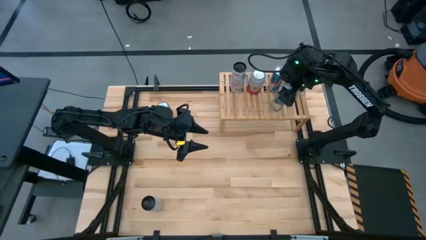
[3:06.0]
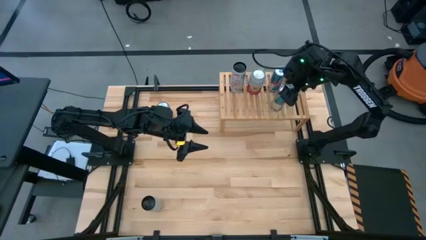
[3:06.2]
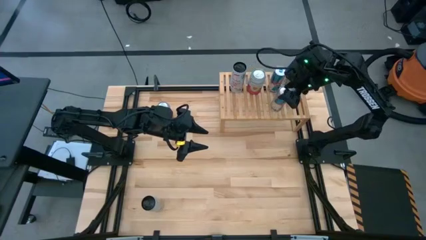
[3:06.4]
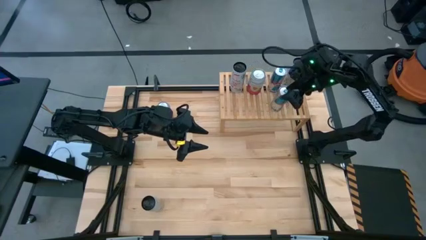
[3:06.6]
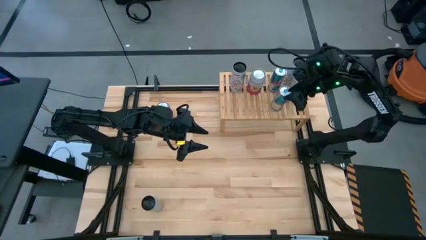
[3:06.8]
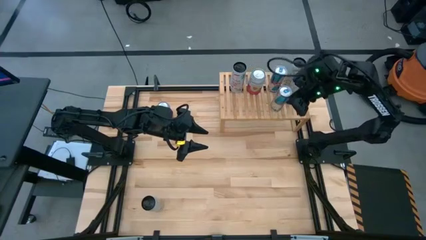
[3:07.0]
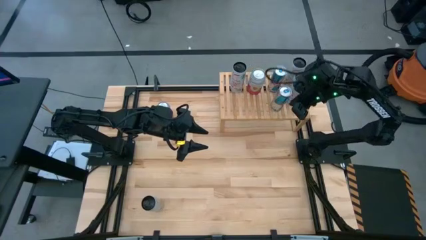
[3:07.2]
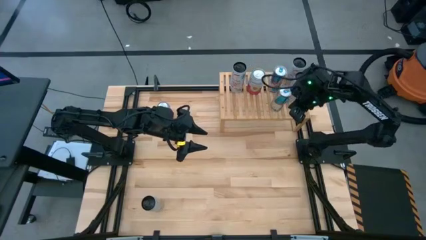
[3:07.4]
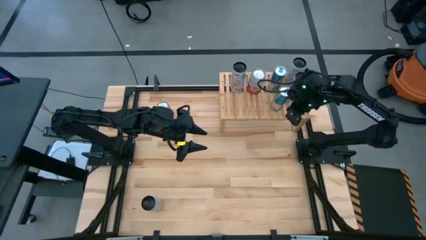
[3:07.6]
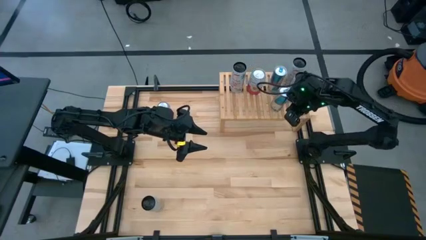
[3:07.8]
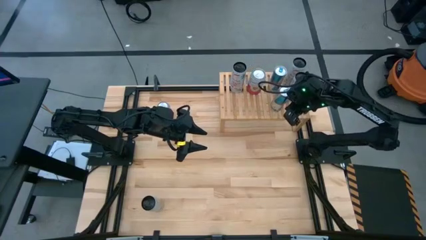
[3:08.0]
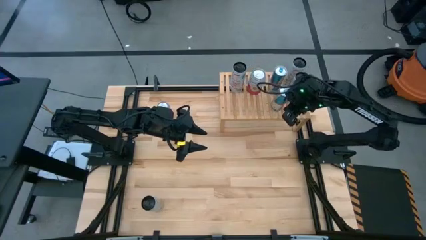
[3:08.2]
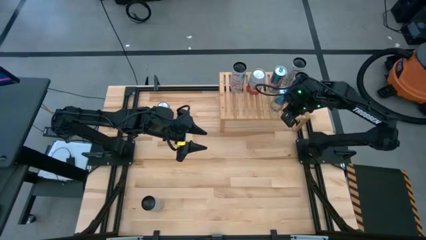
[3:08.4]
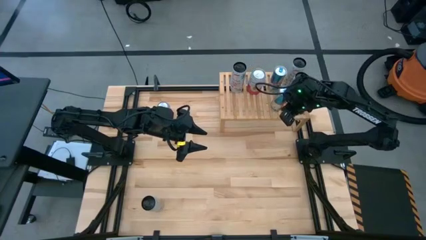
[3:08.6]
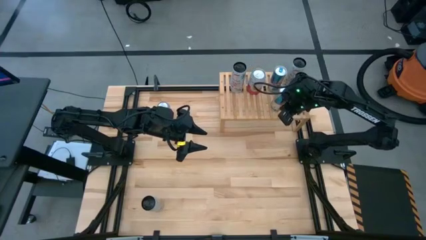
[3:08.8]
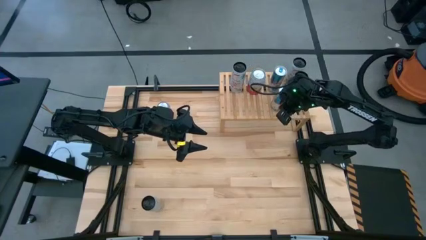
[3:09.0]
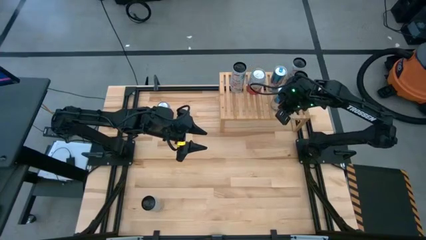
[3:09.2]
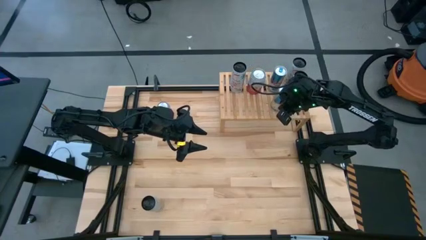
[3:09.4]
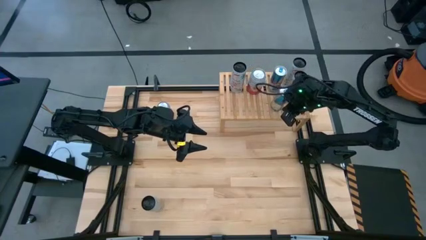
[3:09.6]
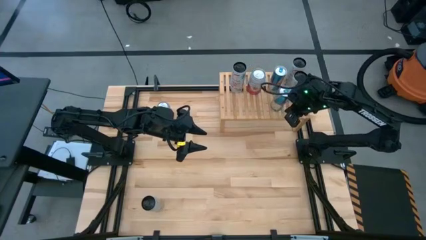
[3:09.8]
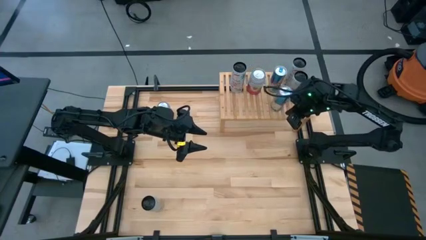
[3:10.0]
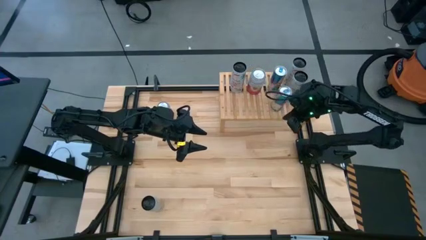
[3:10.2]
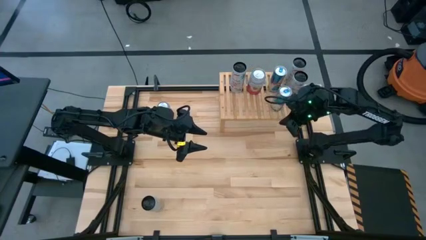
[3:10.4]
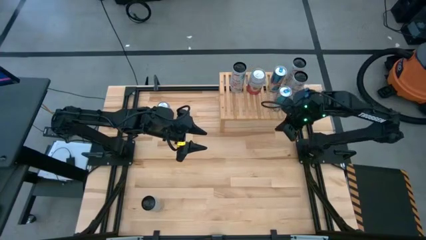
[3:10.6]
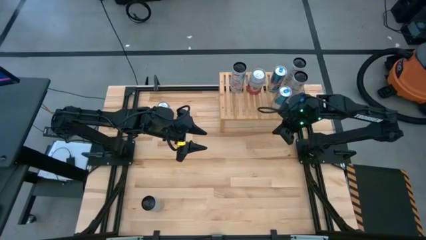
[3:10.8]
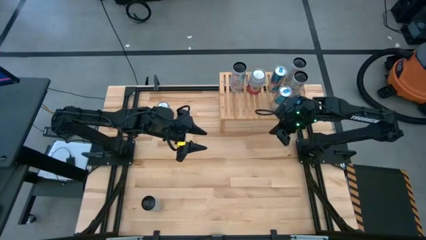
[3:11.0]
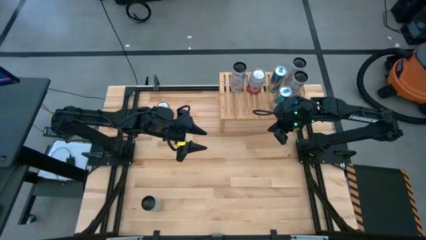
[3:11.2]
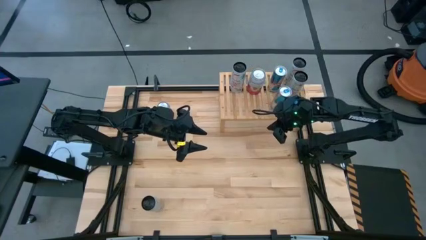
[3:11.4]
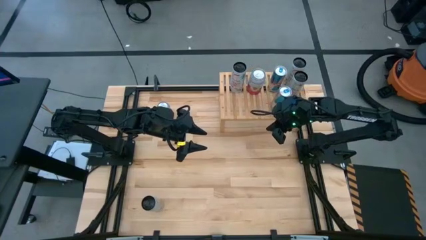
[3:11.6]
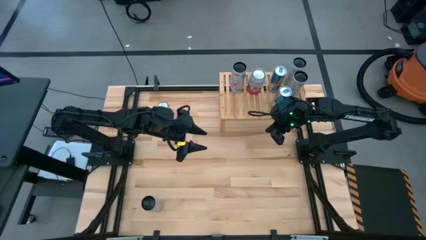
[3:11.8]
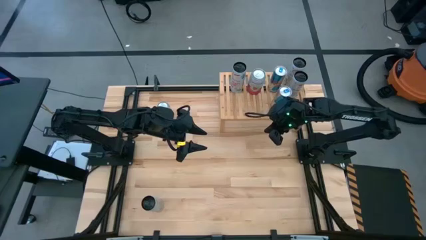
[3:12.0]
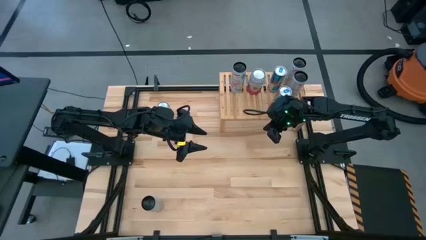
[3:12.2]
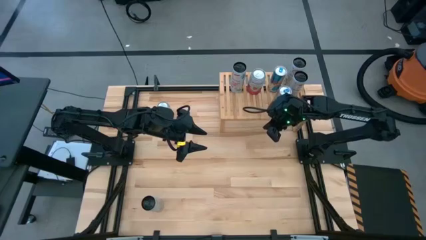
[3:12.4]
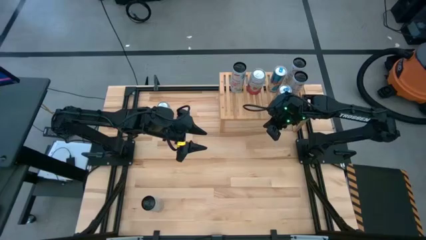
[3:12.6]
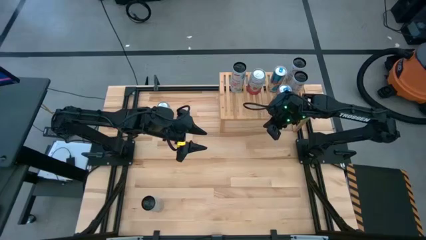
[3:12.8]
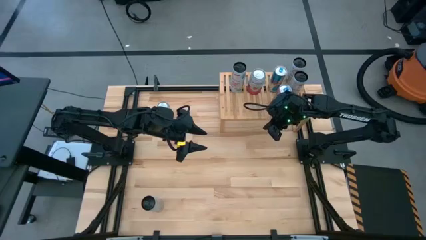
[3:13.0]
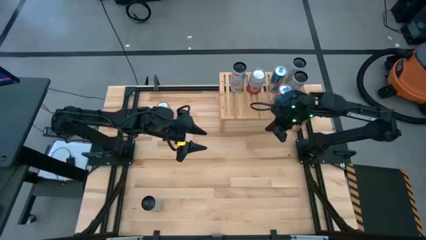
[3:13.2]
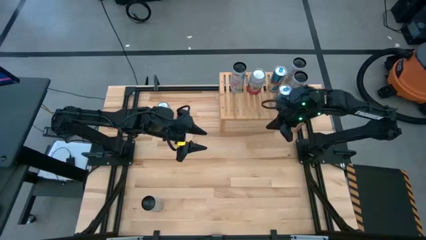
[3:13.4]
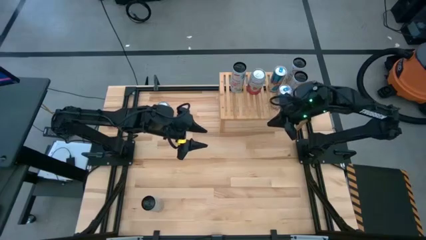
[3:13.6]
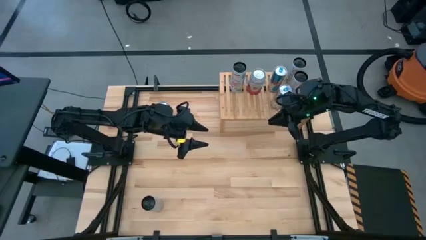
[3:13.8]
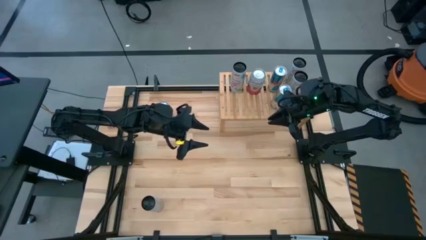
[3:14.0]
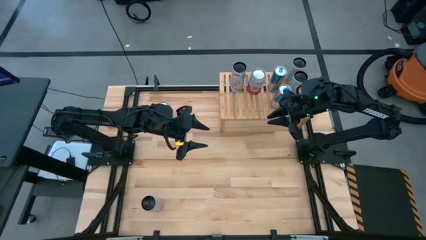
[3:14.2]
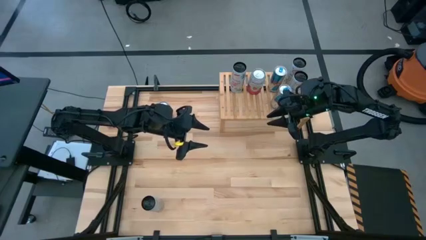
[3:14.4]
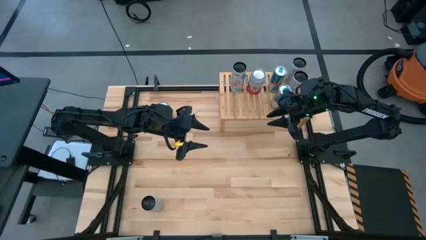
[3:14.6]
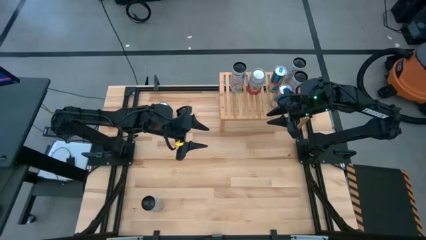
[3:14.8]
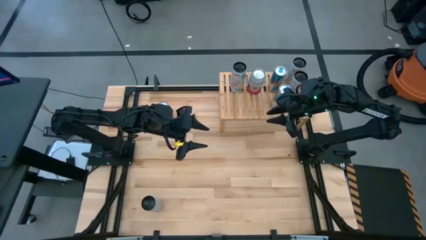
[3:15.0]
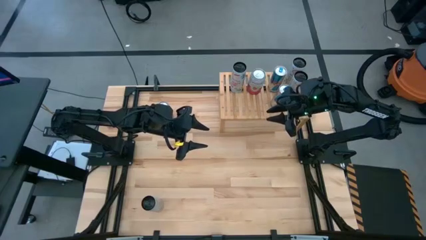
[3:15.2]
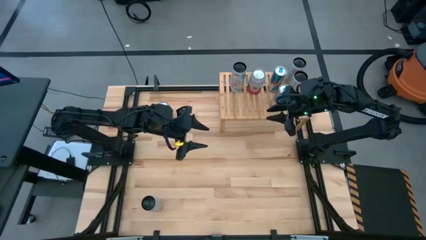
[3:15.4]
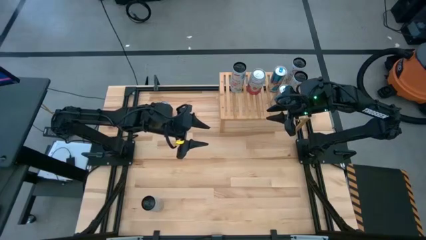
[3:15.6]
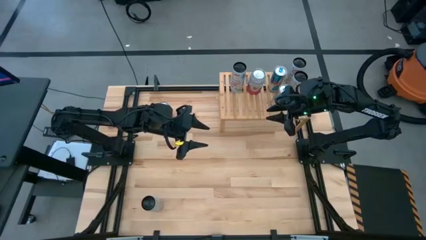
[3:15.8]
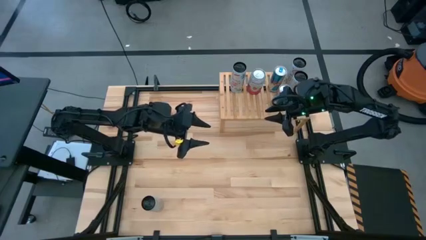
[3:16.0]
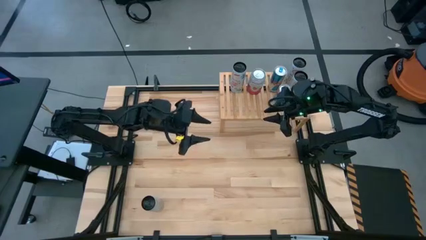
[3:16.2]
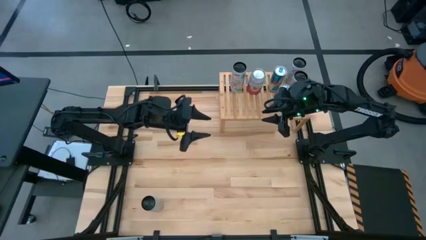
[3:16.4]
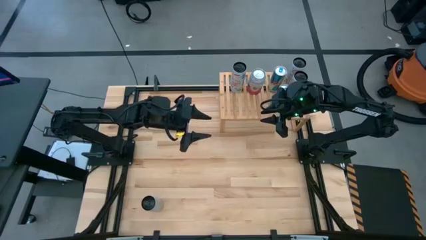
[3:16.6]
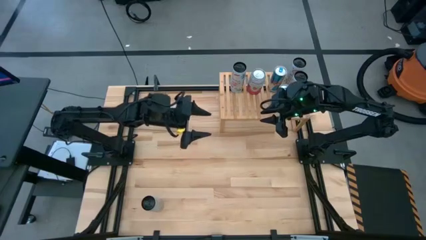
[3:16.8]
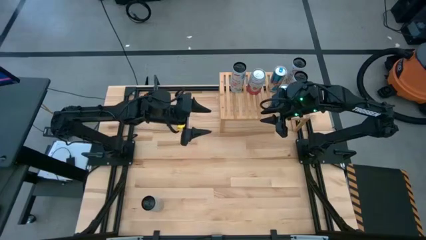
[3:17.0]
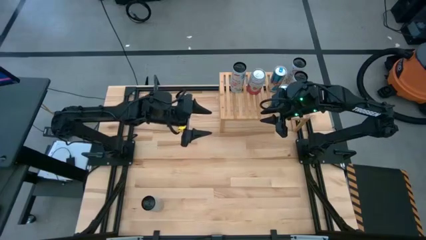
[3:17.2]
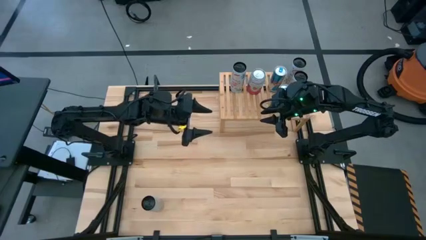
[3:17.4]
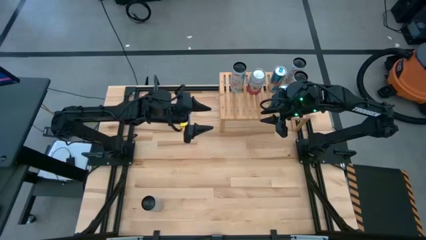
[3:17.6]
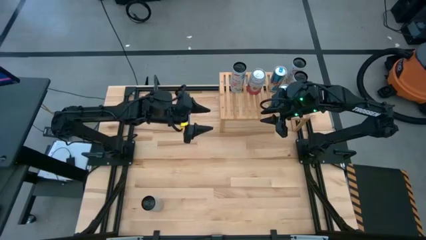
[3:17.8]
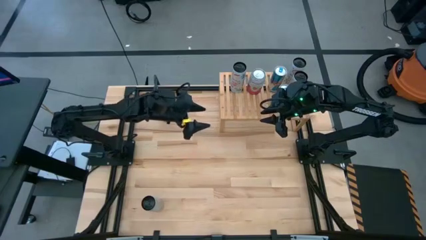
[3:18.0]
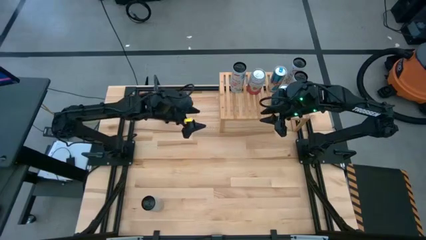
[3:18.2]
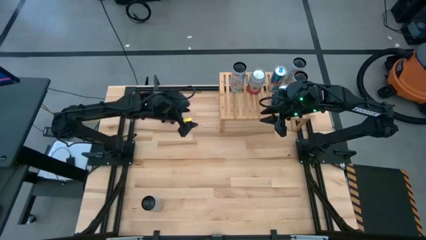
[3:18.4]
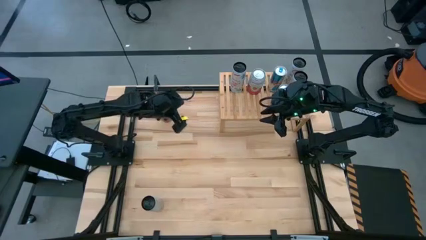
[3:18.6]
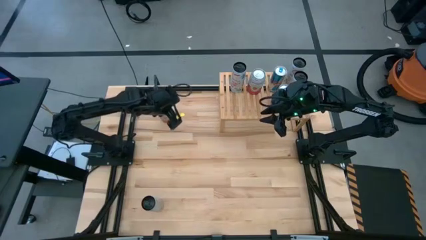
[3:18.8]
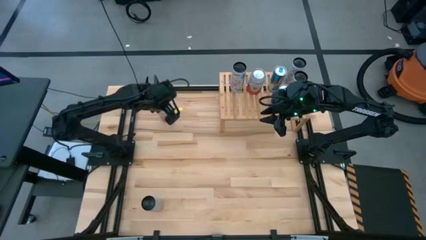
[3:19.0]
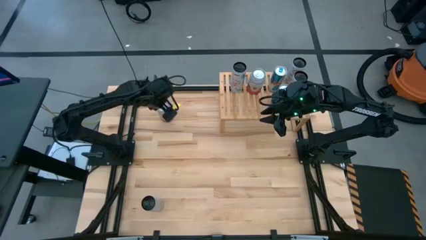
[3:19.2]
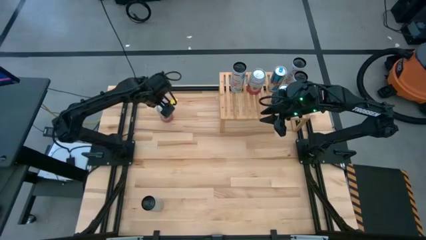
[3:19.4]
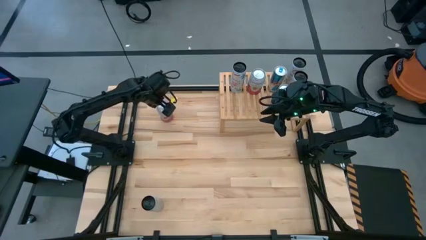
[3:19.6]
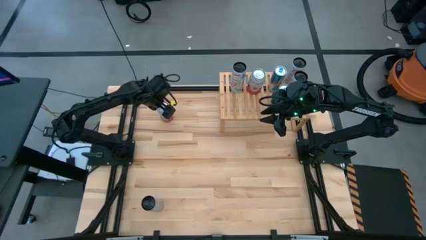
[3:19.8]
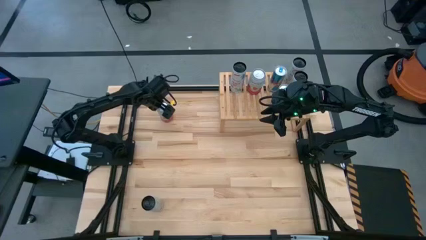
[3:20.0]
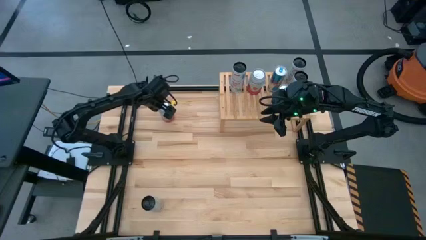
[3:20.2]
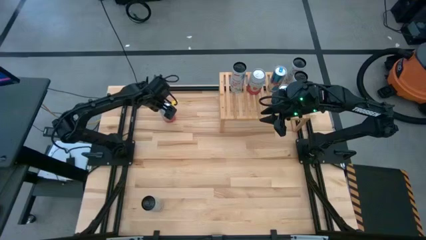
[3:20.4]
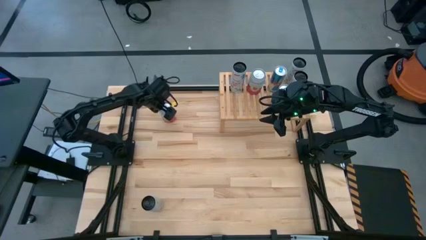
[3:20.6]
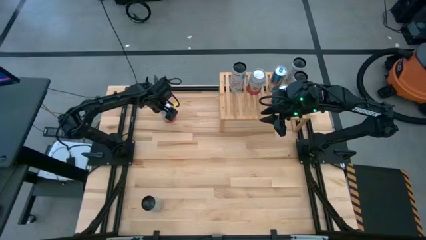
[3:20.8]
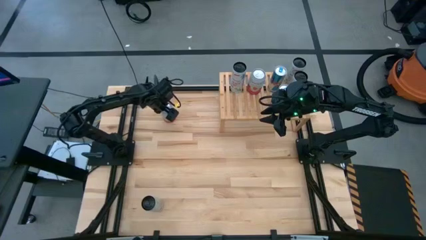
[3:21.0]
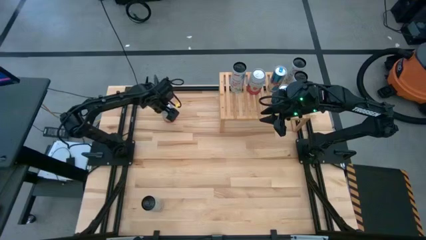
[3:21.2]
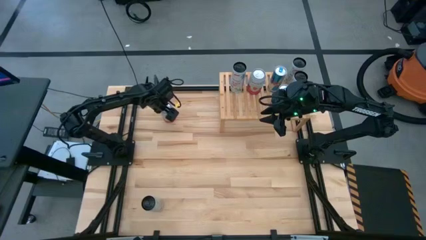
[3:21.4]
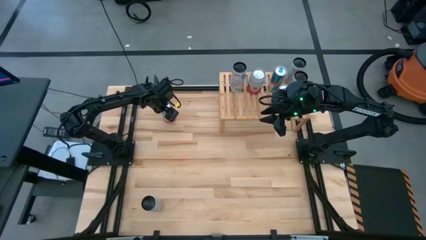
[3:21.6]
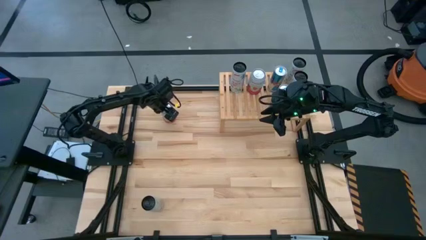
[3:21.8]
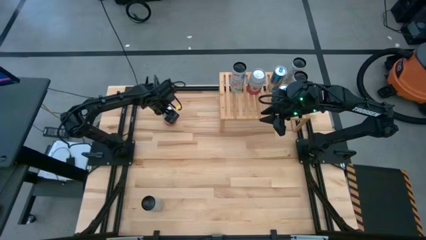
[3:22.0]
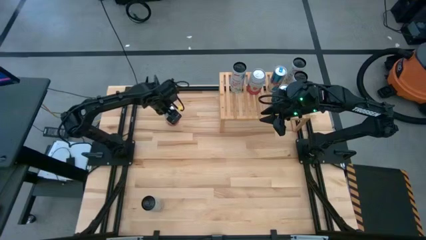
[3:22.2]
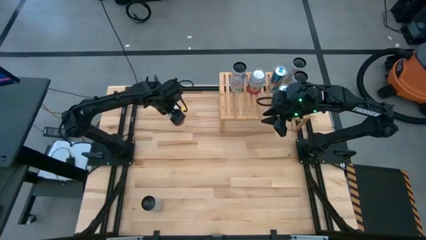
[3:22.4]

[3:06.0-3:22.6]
Task: Place canned beverage on shelf
Put the pink-white soda can on the shelf aligned with the other pink-white soda can
